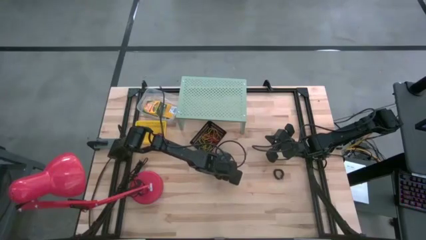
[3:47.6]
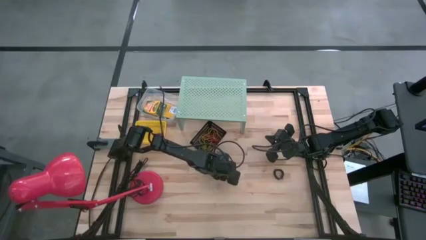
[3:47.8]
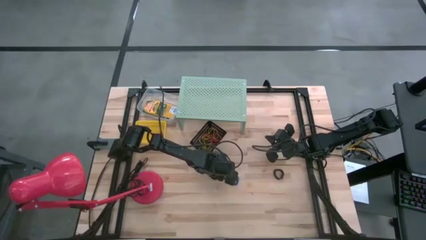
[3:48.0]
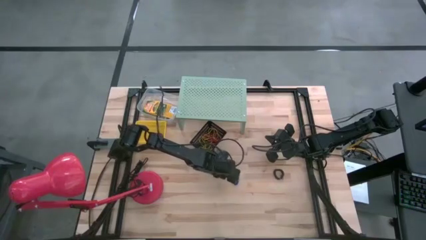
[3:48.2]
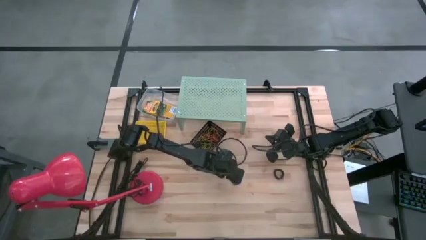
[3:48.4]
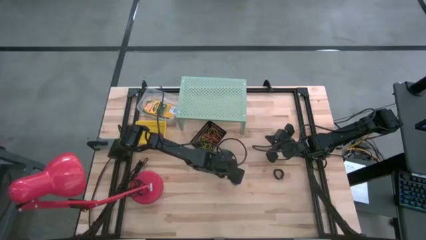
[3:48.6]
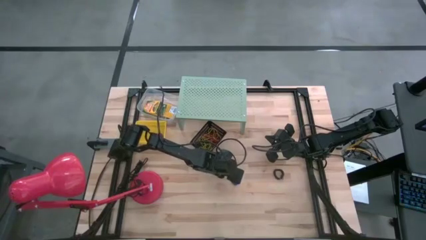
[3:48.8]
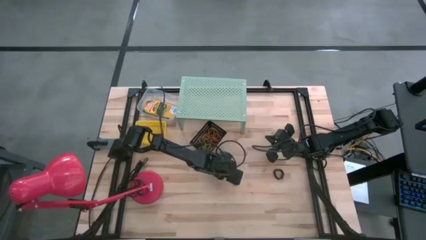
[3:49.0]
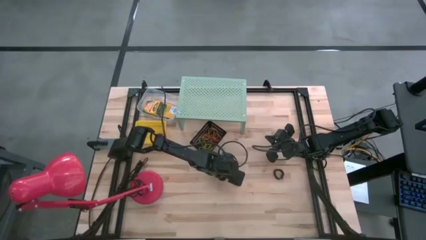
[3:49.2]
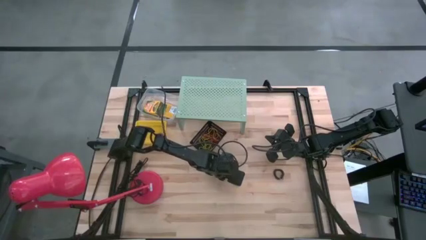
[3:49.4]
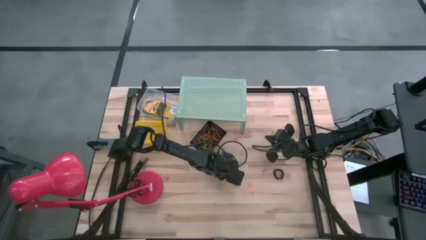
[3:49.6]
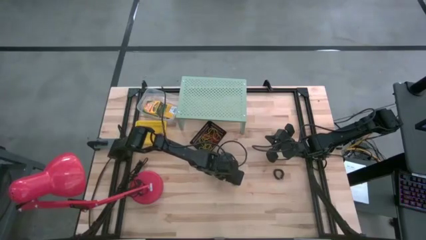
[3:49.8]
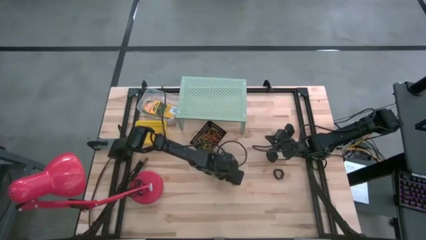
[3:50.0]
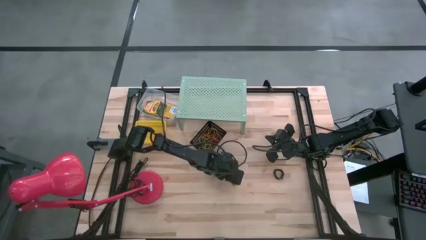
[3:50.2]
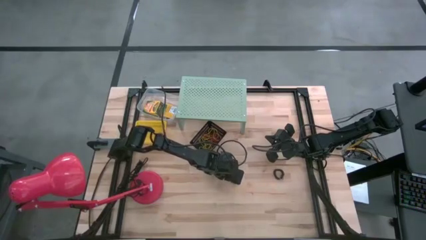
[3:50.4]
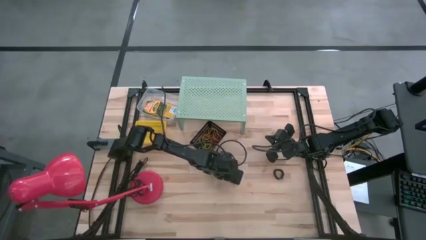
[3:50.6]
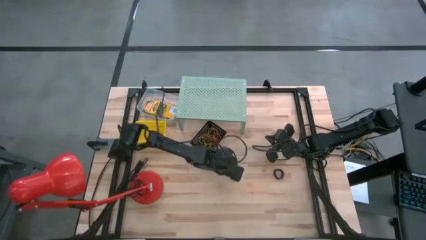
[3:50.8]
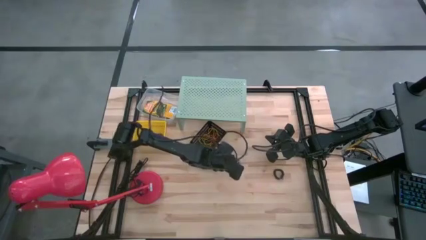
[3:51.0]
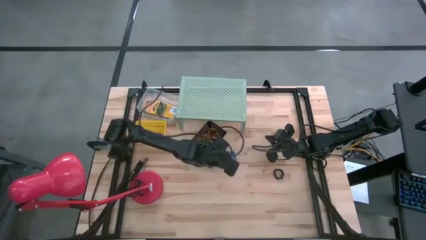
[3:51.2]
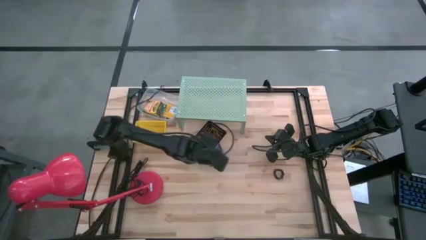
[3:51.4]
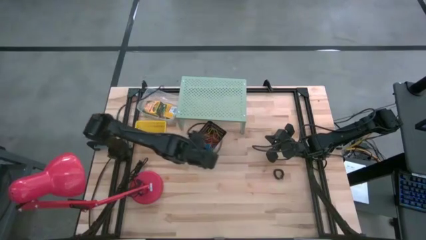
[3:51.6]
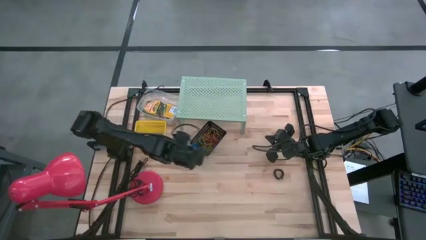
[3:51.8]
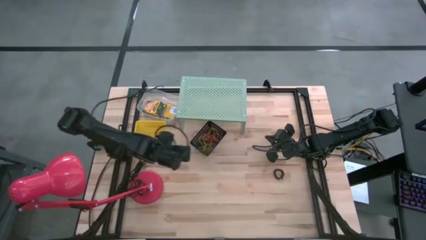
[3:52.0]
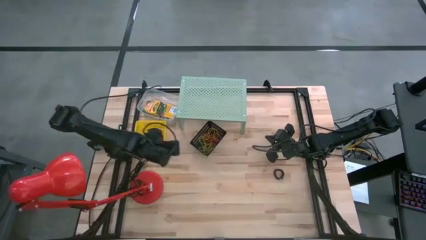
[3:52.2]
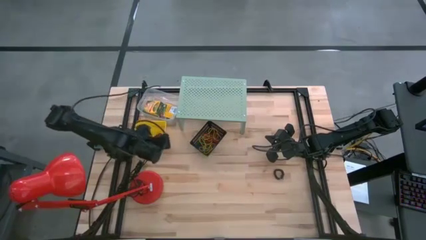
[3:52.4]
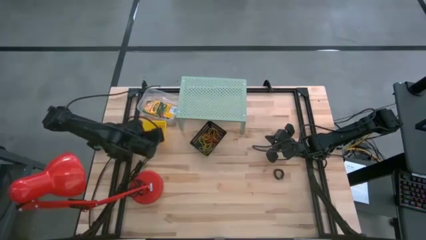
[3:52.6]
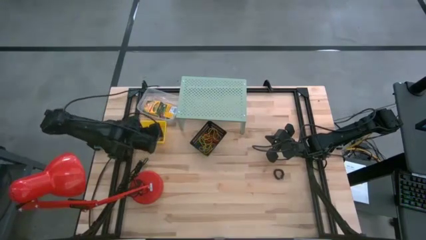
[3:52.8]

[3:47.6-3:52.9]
Task: Pick & Place Office Desk Supplies
Put the blue spring rubber band into the yellow bin

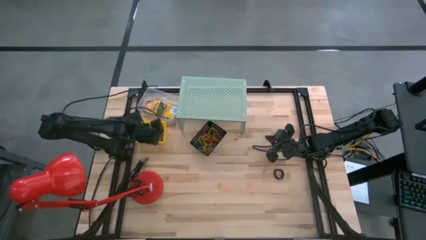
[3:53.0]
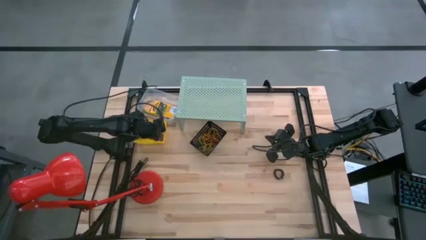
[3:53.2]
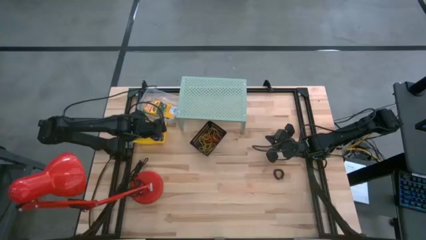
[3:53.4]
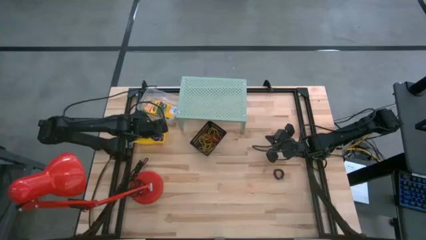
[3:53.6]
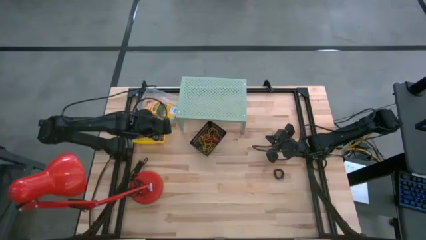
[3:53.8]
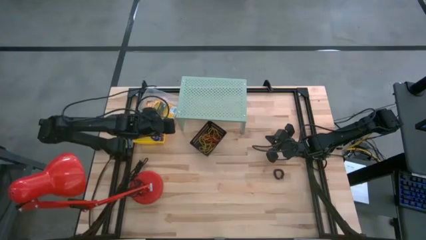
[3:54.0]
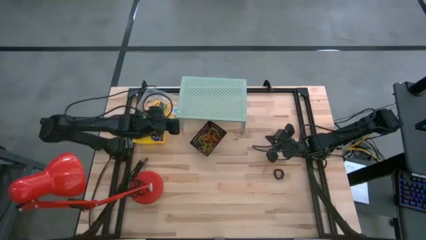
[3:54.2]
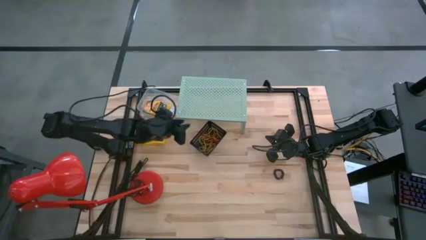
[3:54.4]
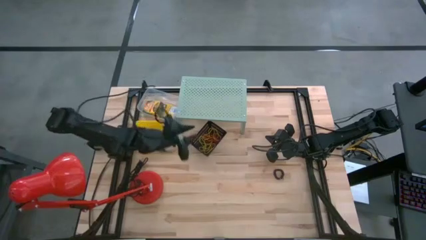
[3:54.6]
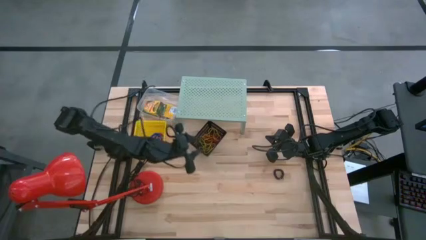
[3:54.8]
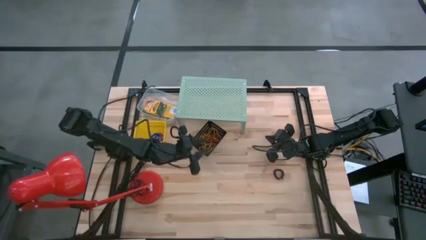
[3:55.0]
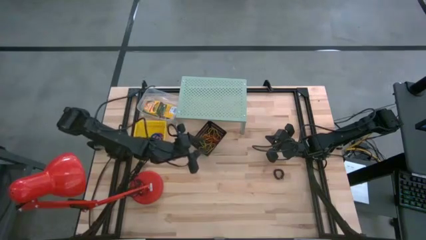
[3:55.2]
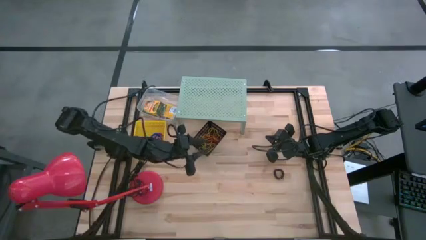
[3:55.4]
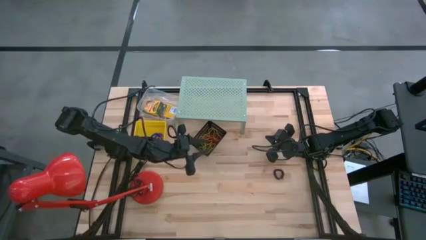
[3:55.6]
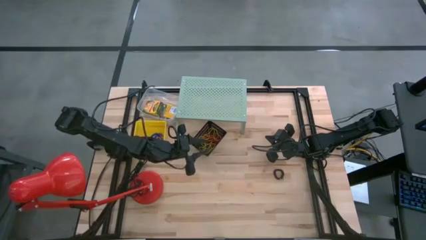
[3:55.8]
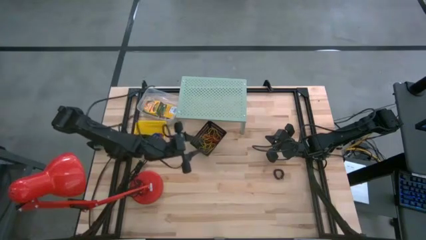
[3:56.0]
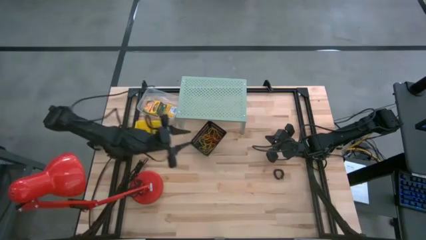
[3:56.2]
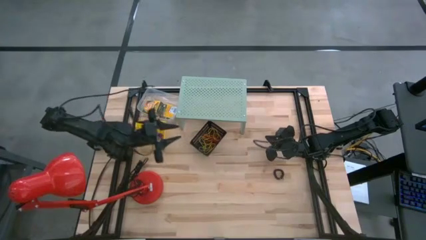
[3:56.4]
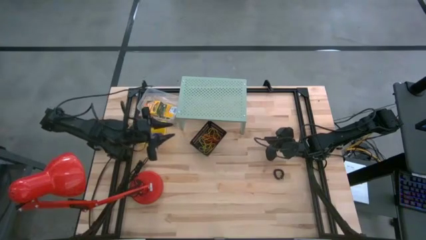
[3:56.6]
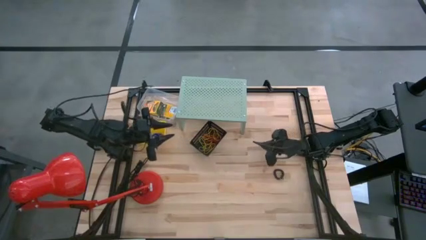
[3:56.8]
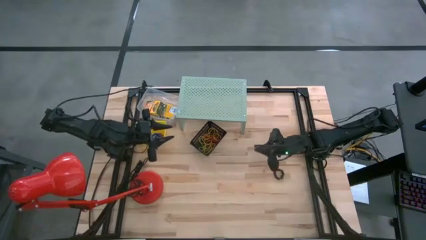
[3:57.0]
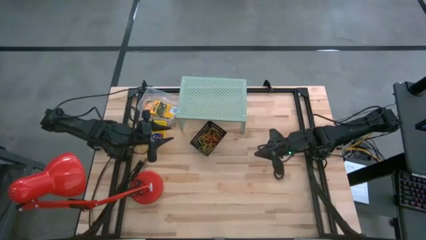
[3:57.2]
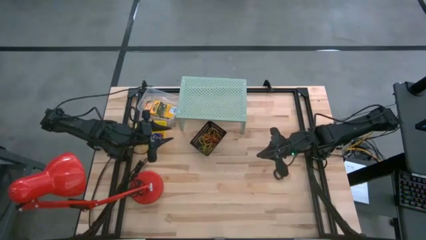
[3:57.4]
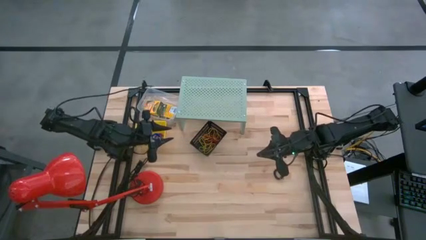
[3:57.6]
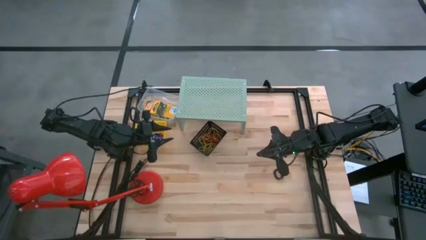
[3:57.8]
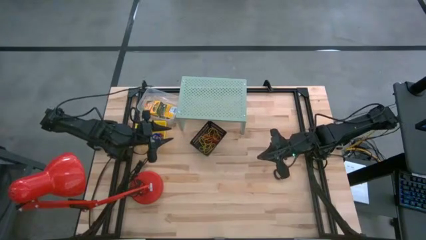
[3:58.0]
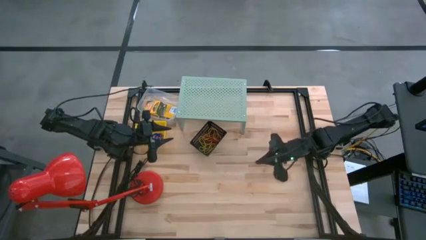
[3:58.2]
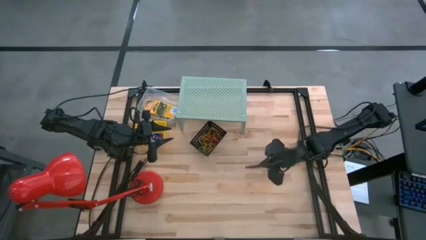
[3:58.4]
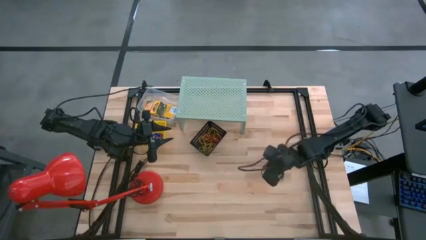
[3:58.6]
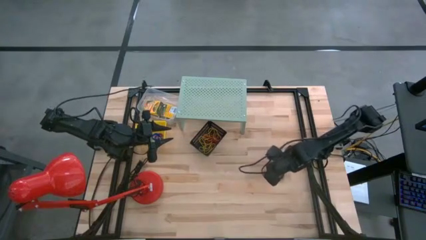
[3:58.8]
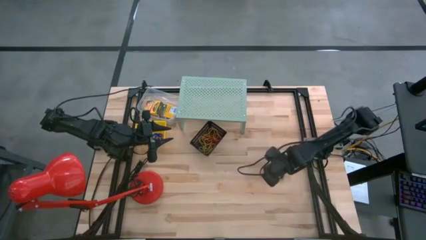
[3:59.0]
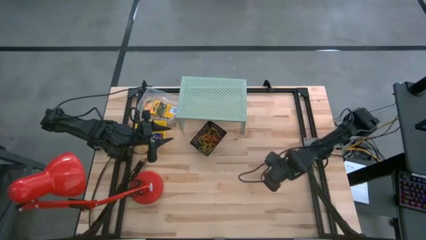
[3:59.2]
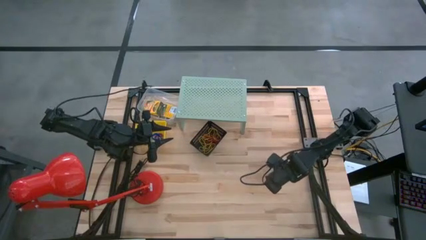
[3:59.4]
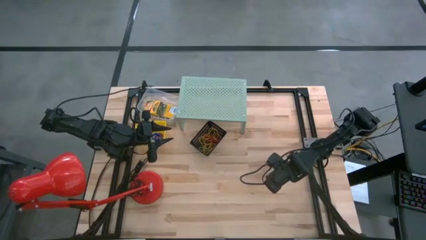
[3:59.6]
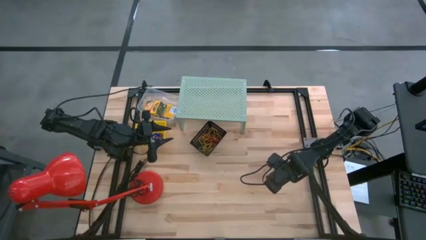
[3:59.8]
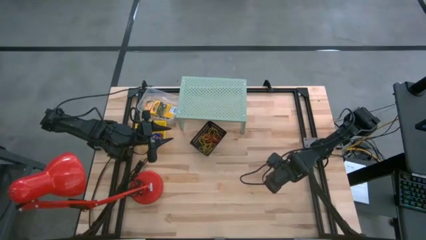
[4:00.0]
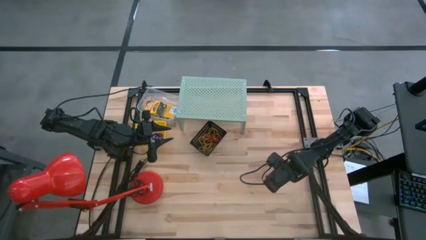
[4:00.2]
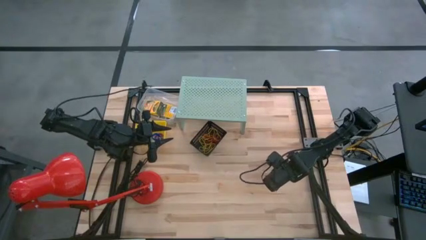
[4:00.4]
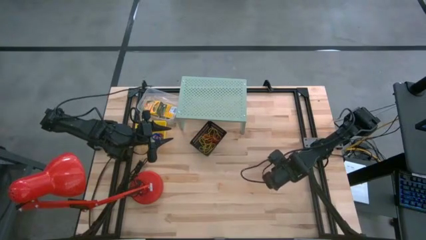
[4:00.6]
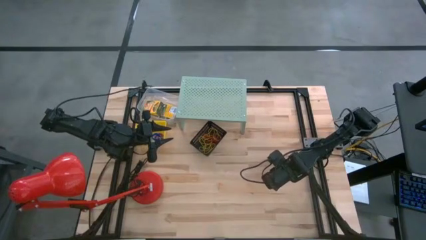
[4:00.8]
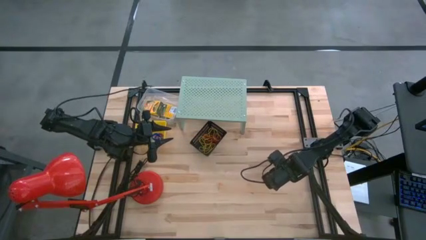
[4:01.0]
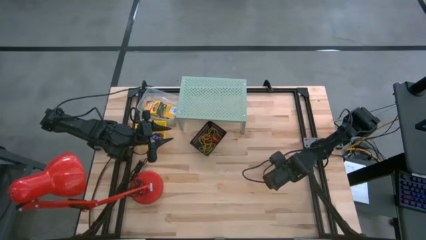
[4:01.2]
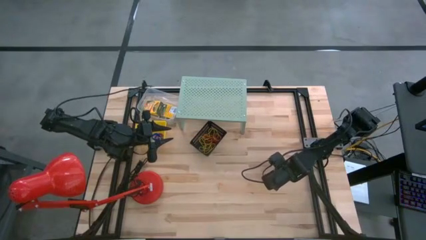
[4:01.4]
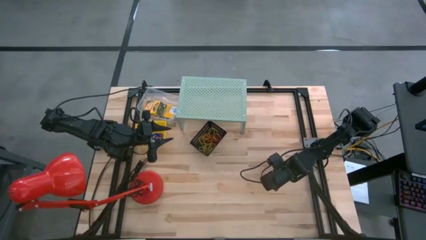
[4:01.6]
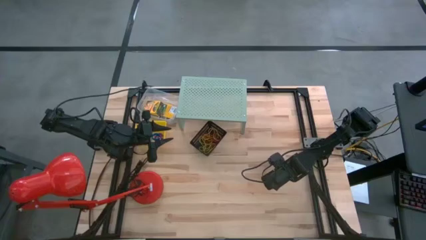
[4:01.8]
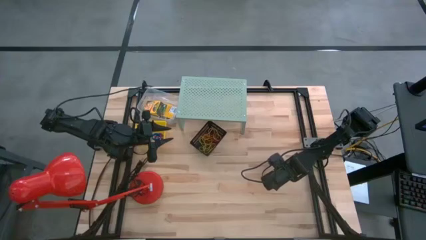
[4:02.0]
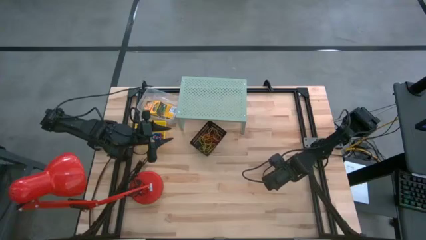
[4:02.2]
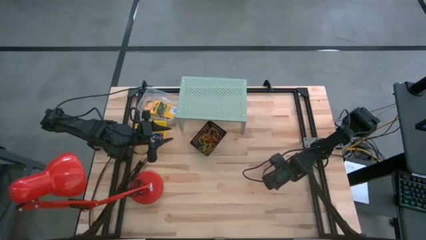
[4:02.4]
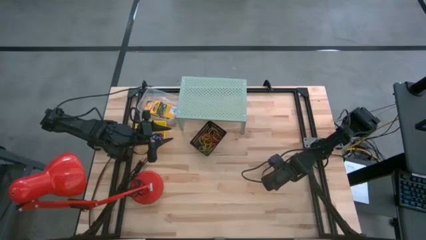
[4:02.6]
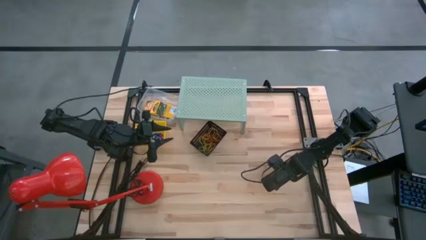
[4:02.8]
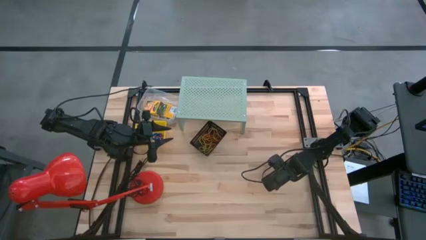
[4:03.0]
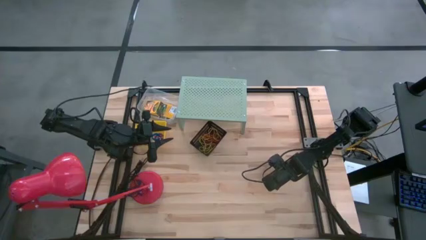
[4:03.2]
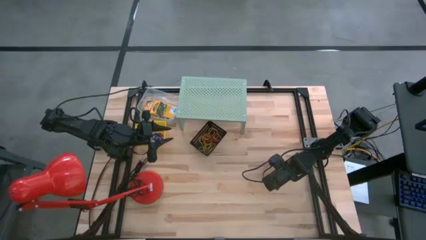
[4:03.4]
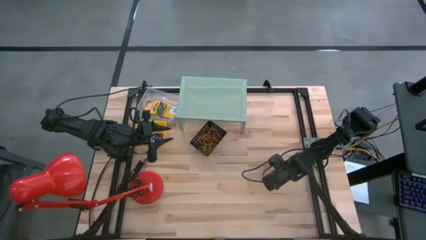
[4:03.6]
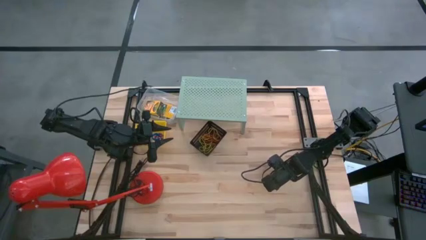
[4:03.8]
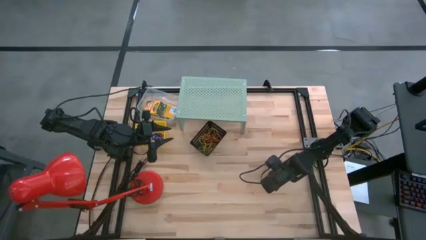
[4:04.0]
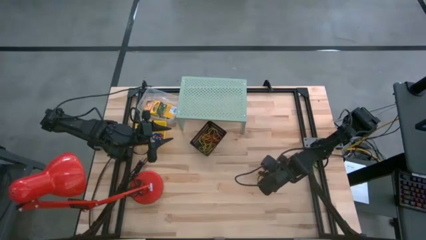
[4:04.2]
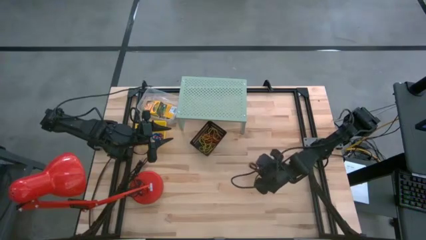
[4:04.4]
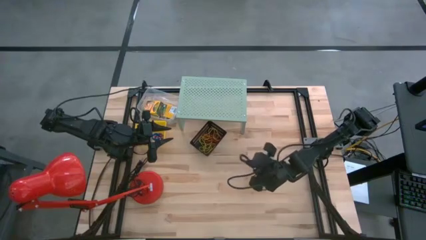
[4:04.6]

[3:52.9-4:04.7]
Put the black spring rubber band into the yellow bin
